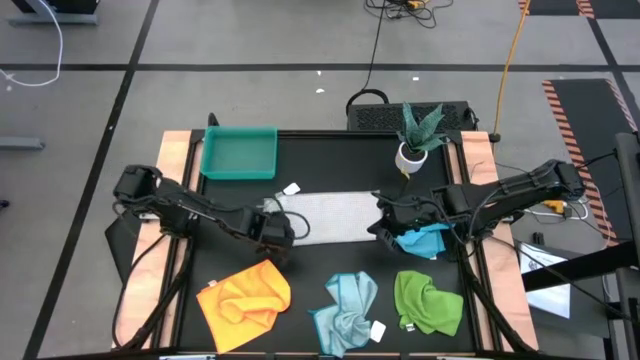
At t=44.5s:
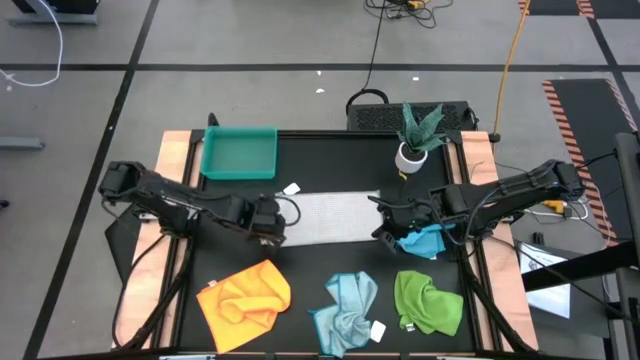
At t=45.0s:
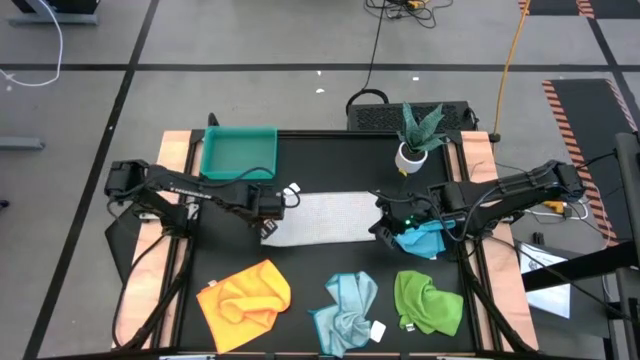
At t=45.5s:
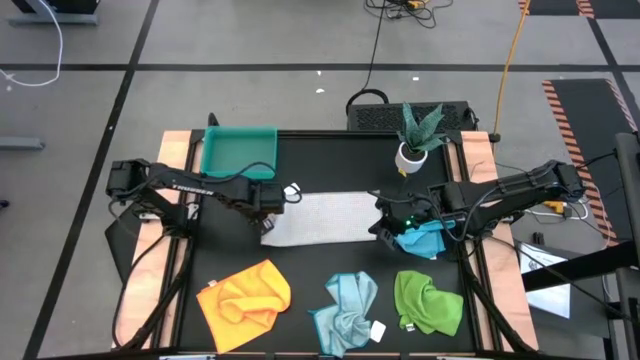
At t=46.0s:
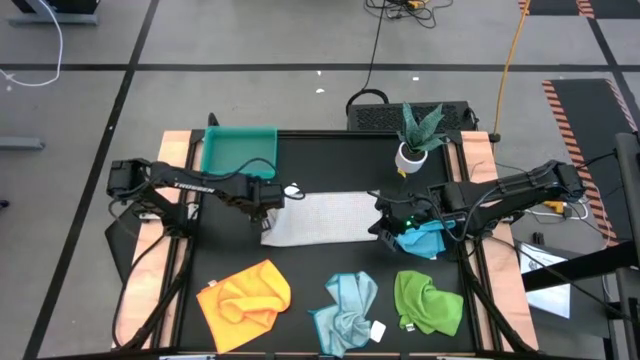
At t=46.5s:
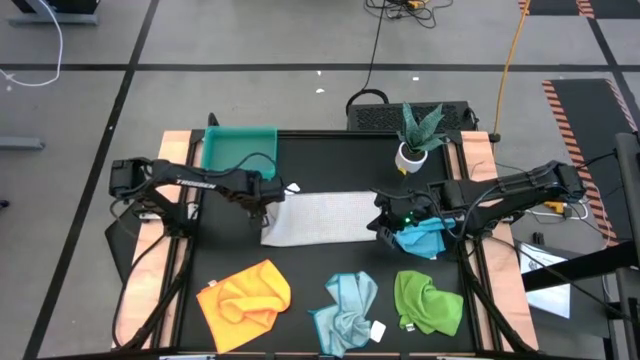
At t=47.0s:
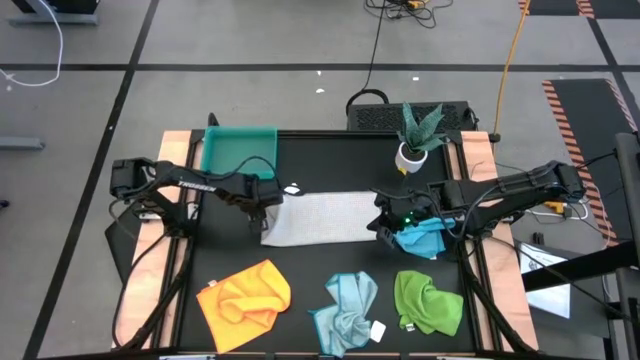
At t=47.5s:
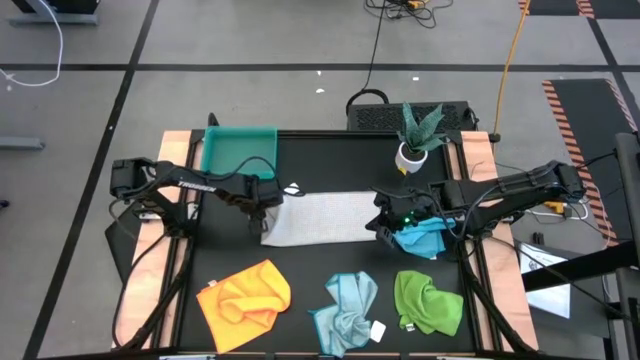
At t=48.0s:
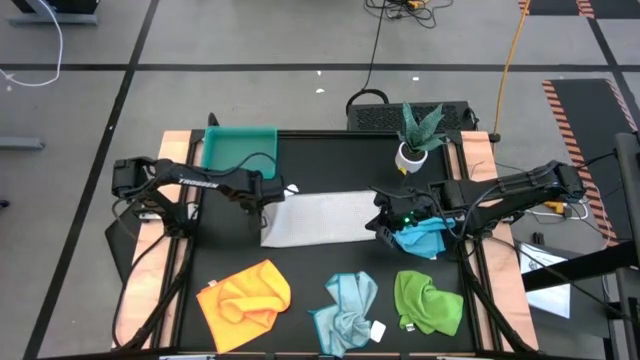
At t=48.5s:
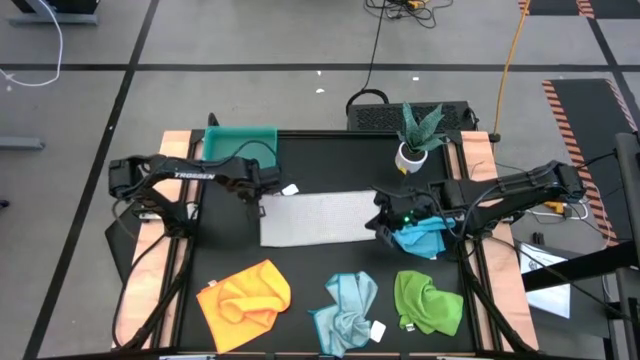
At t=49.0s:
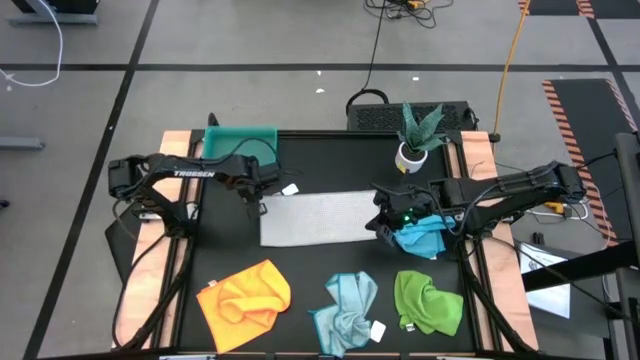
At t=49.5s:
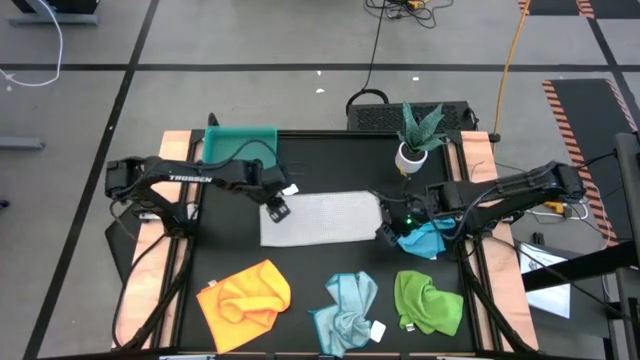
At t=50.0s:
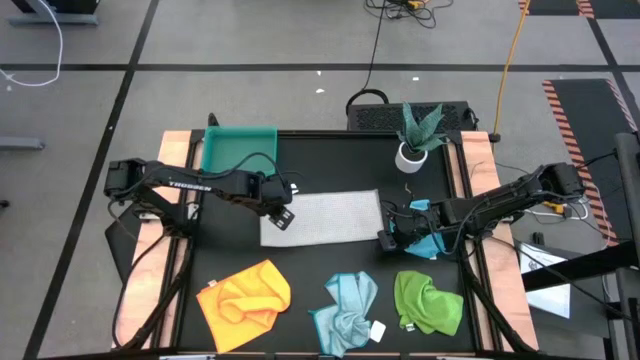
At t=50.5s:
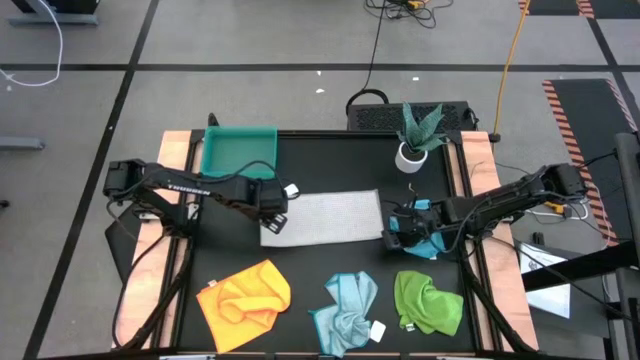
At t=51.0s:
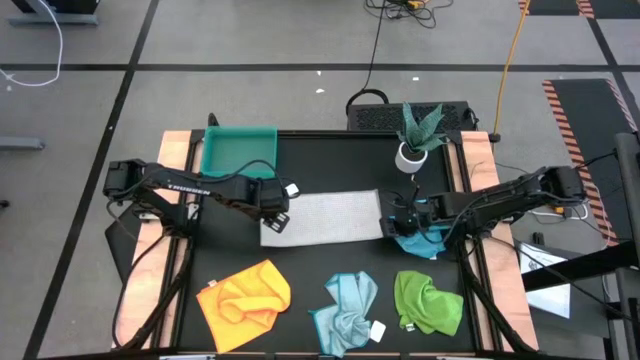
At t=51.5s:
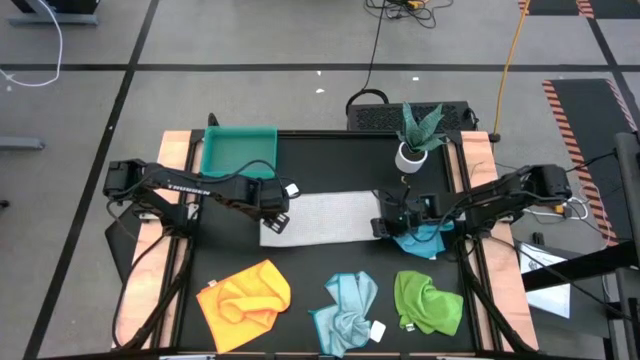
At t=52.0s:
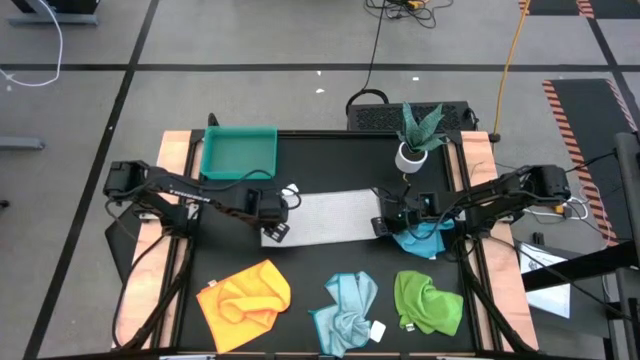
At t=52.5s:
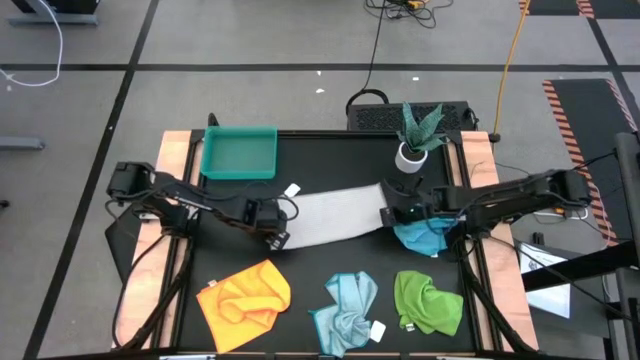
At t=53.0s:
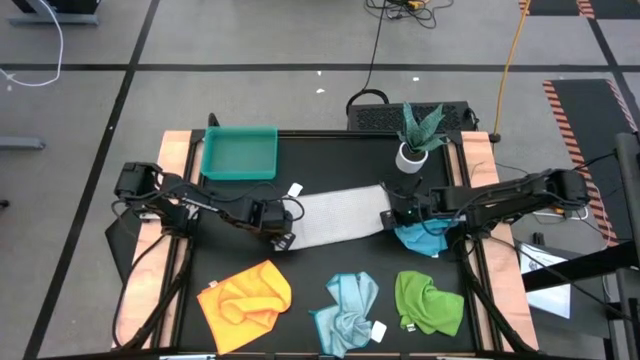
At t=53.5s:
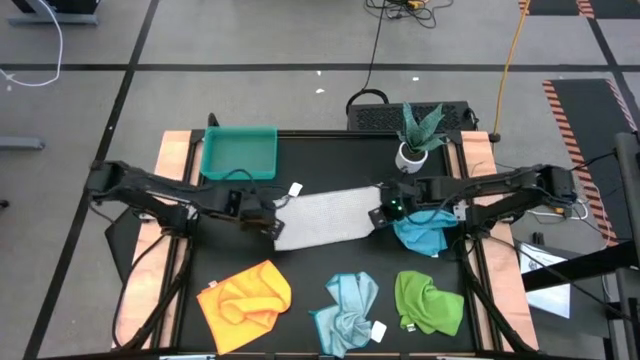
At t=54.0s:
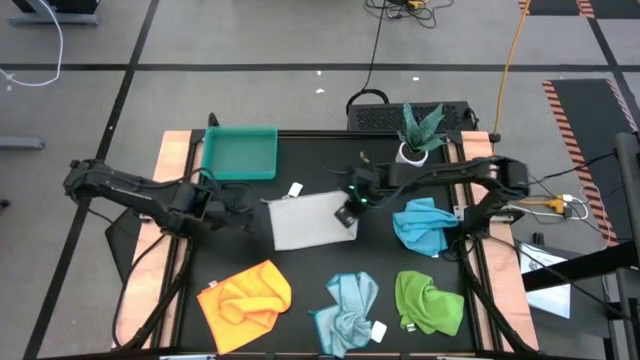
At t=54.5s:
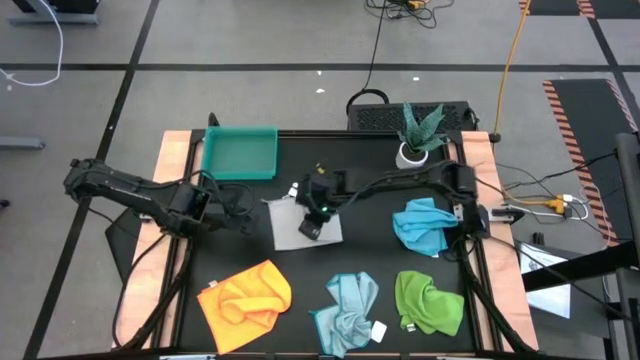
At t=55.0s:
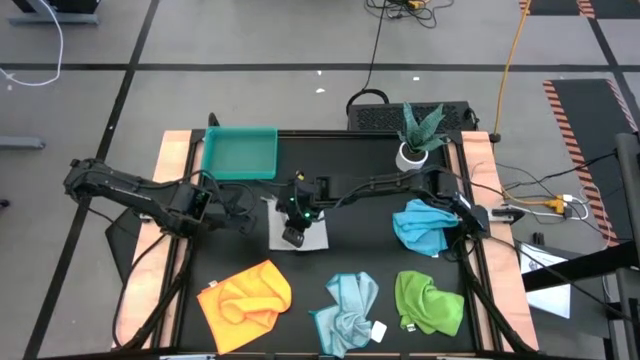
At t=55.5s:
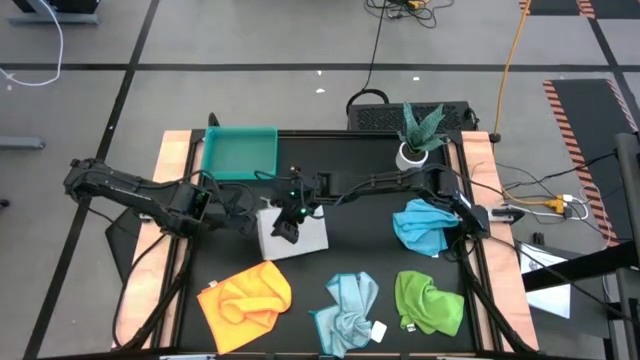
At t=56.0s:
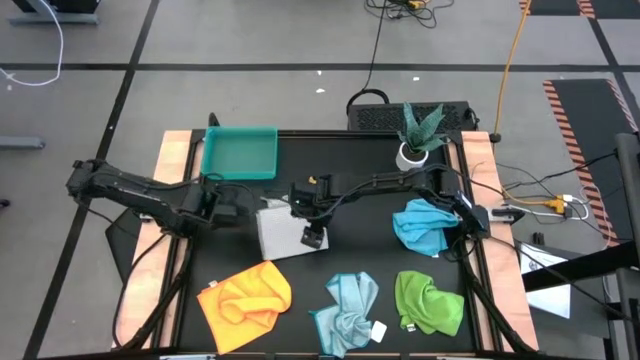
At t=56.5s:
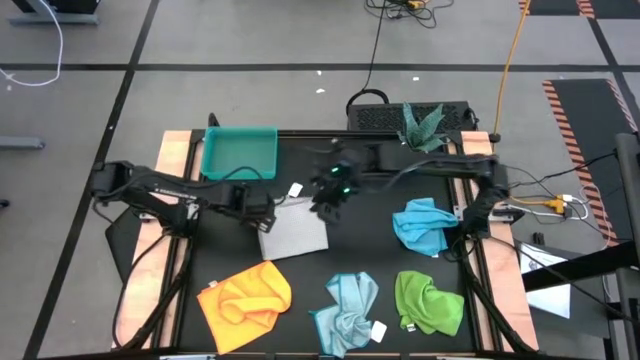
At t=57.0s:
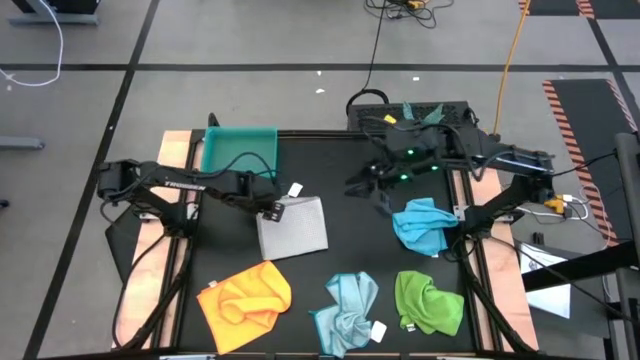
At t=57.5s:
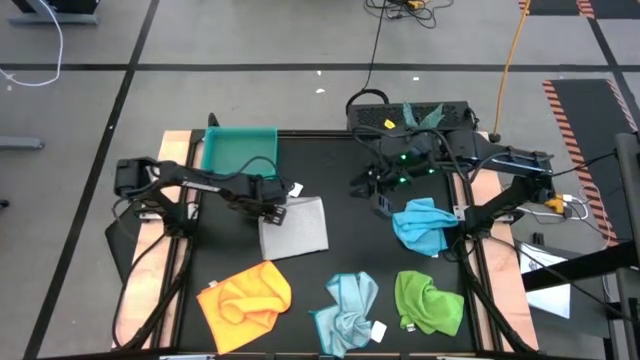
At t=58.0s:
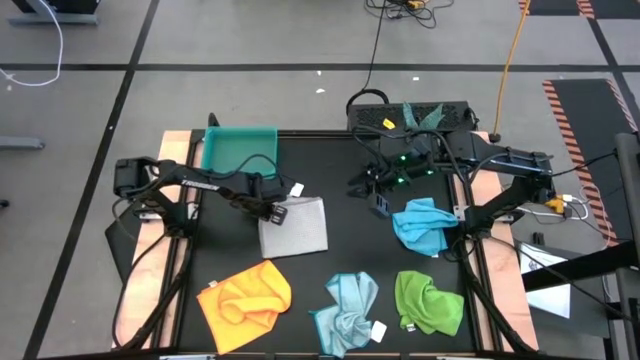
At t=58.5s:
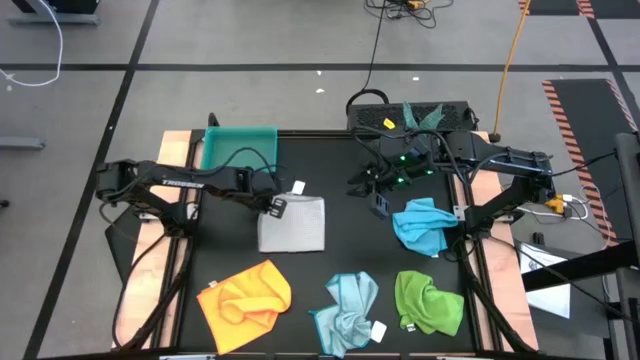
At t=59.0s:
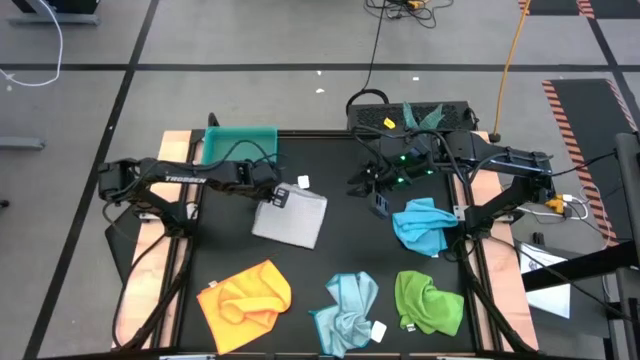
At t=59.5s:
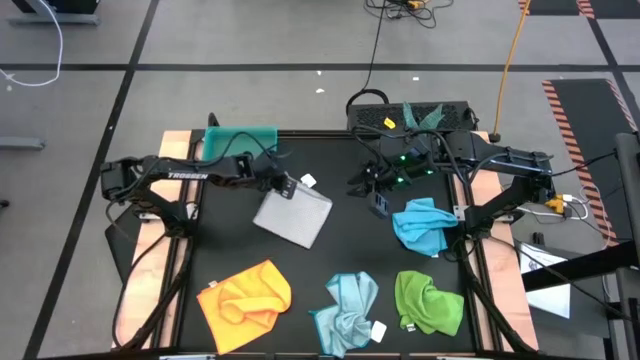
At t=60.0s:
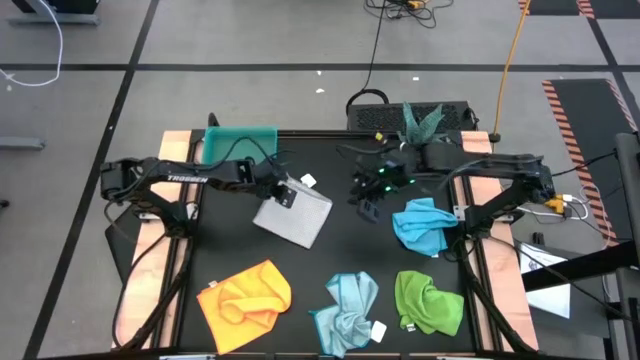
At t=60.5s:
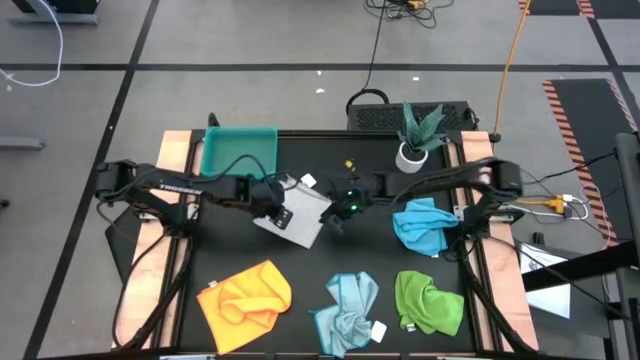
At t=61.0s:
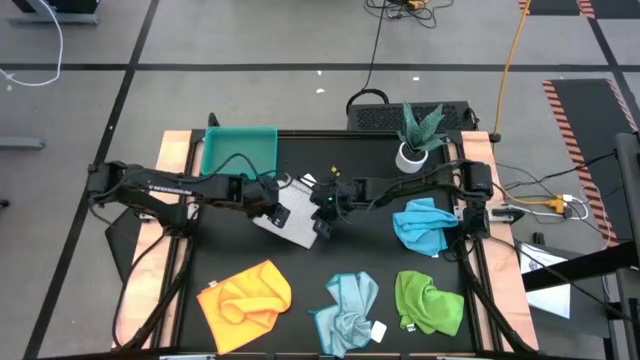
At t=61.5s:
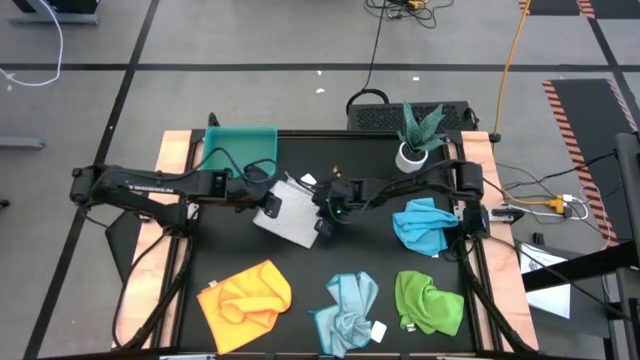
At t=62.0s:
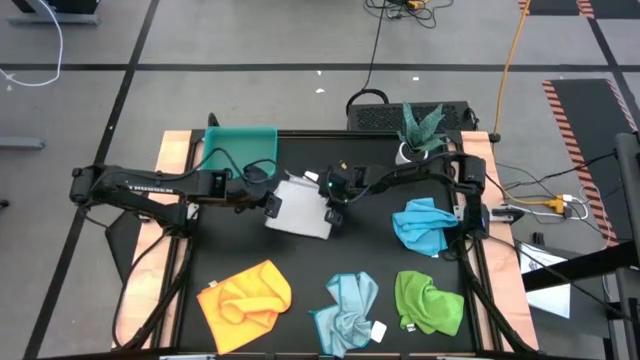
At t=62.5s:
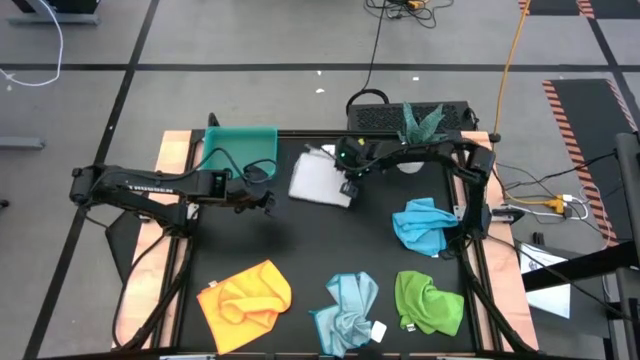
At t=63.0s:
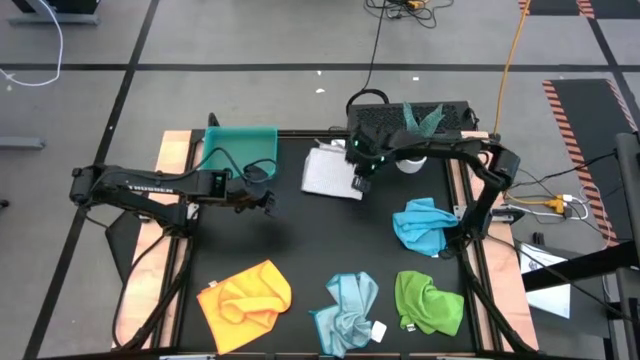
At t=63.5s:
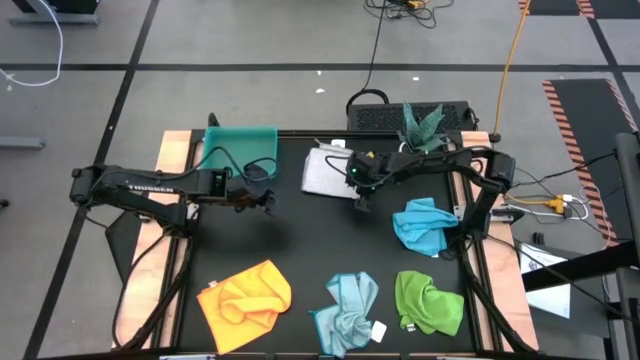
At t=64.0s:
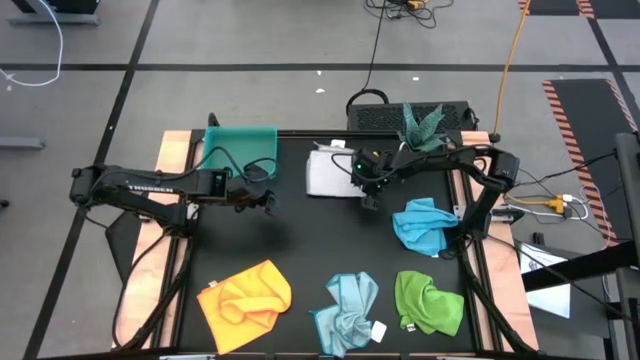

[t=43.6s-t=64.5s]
Task: Fold microfiber towels
Fold the gray microfiber towel

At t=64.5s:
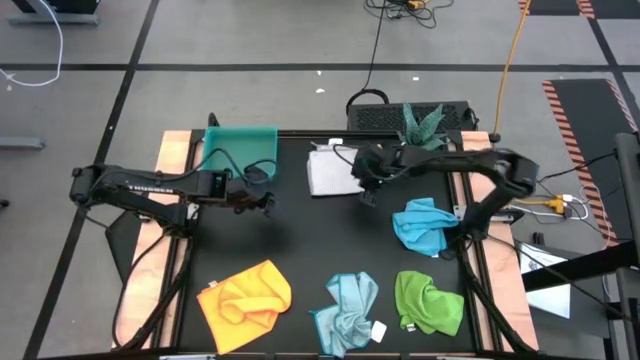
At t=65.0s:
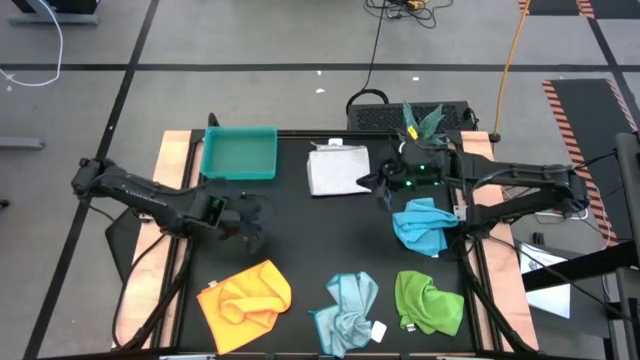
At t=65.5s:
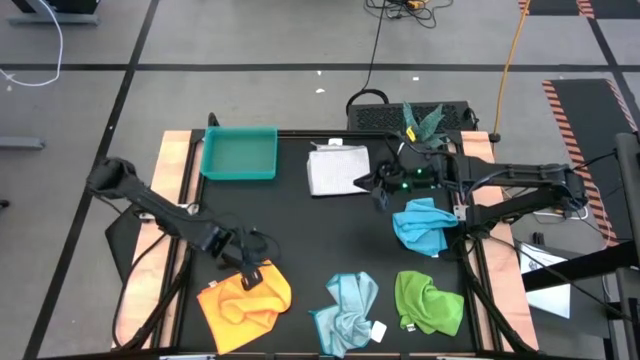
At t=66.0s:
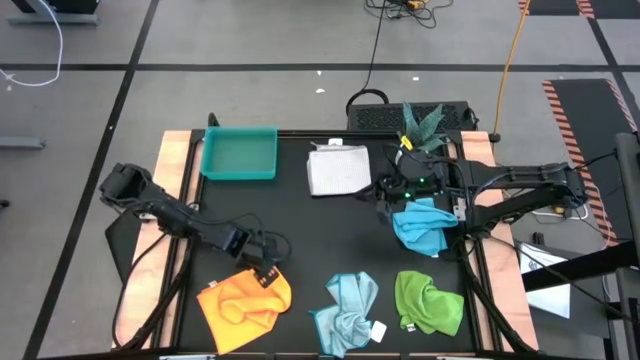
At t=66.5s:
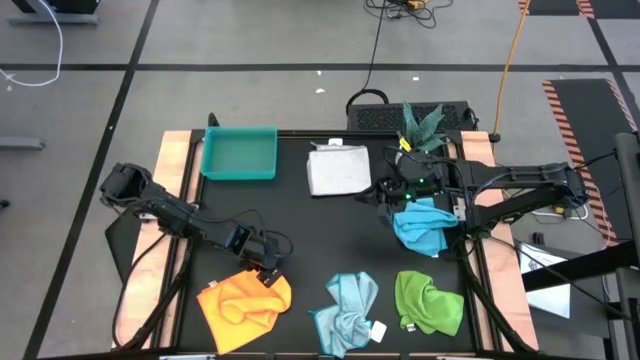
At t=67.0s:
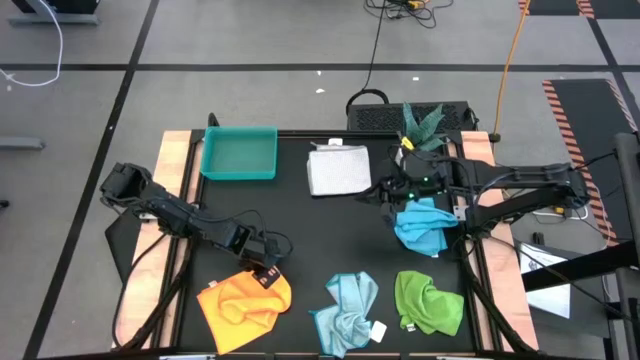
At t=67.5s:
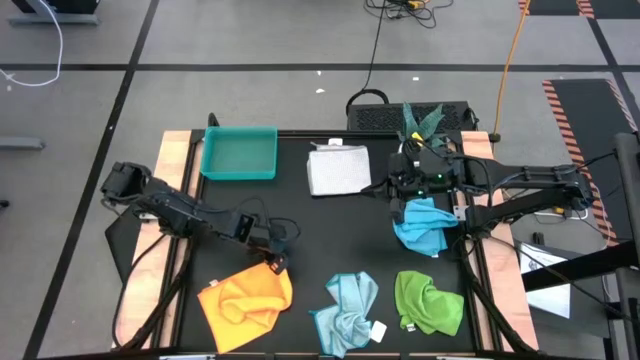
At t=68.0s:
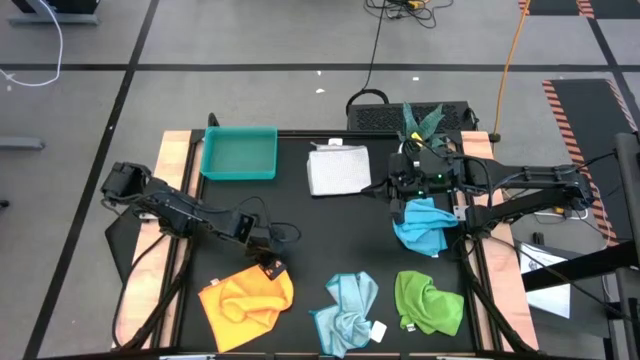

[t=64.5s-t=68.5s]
Fold the orange microfiber towel
